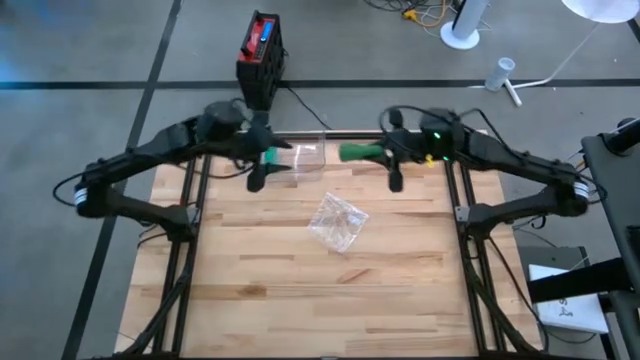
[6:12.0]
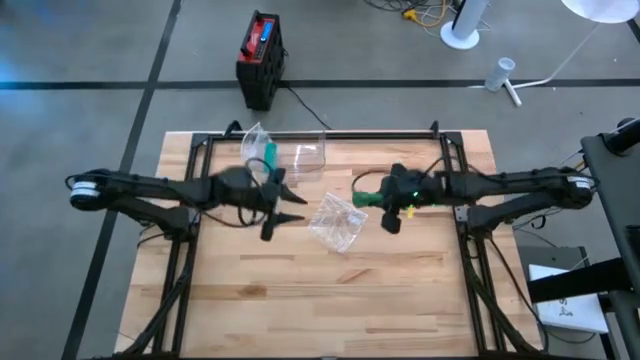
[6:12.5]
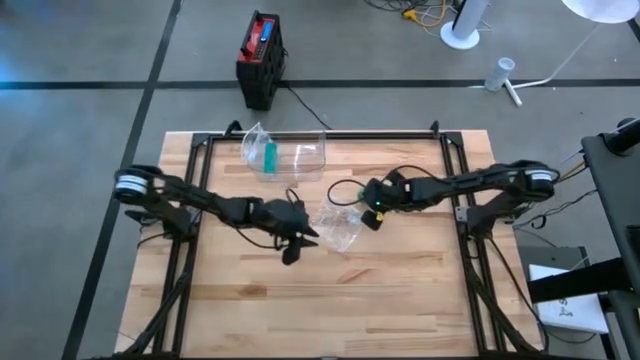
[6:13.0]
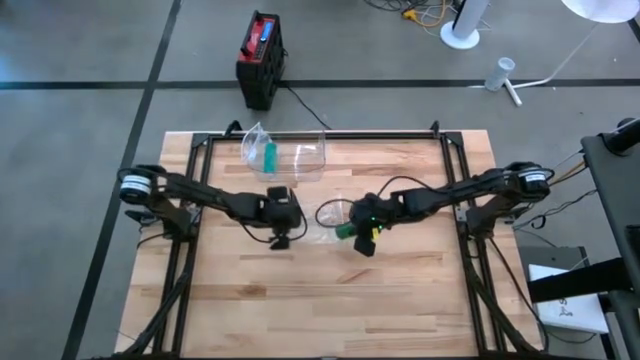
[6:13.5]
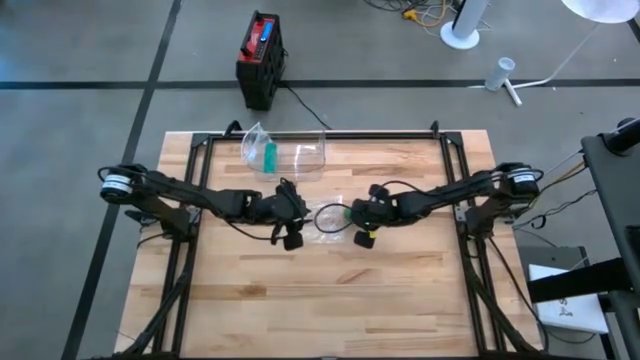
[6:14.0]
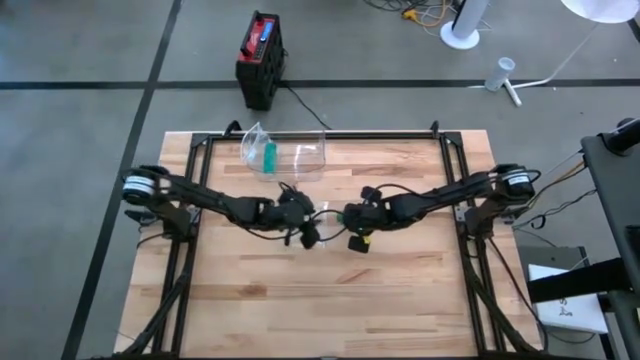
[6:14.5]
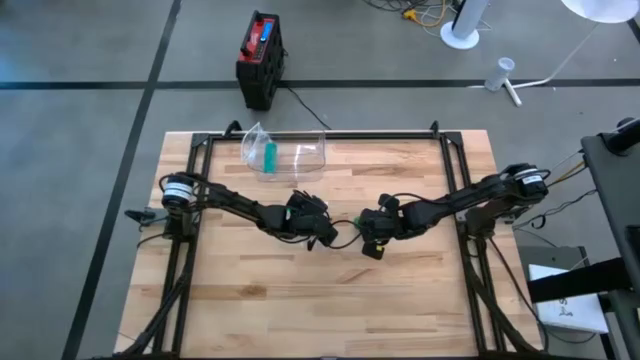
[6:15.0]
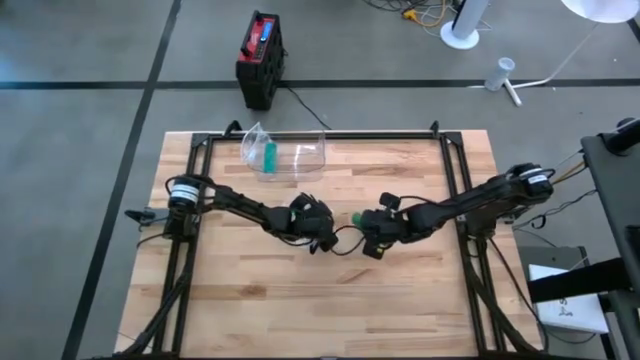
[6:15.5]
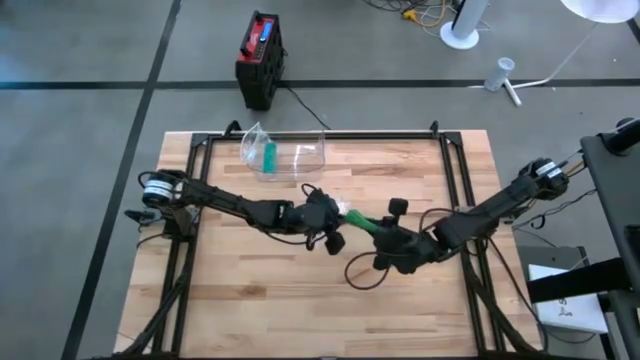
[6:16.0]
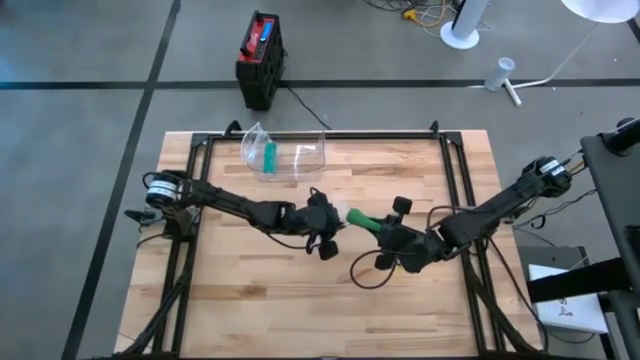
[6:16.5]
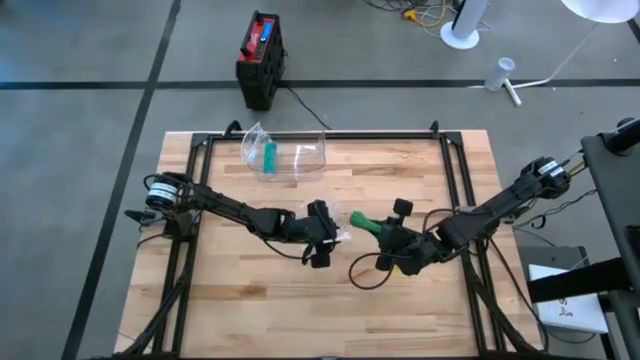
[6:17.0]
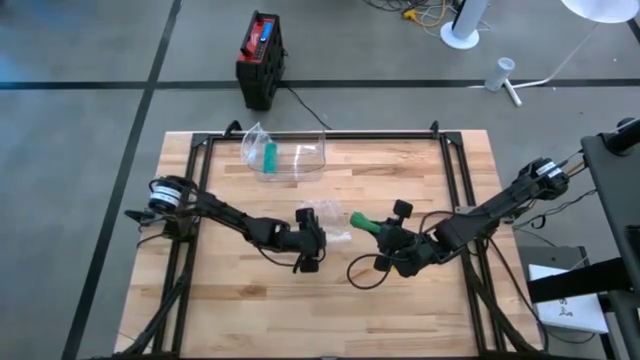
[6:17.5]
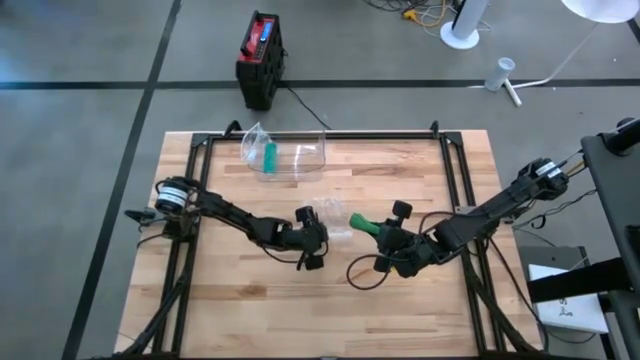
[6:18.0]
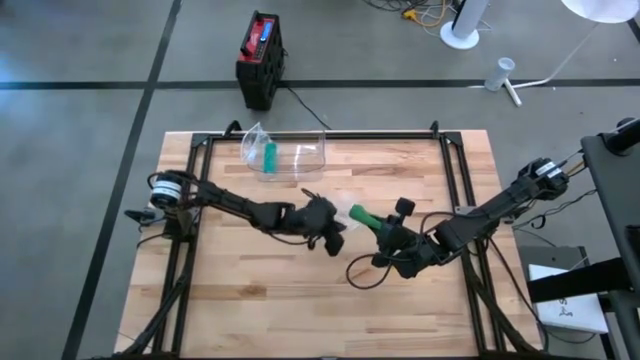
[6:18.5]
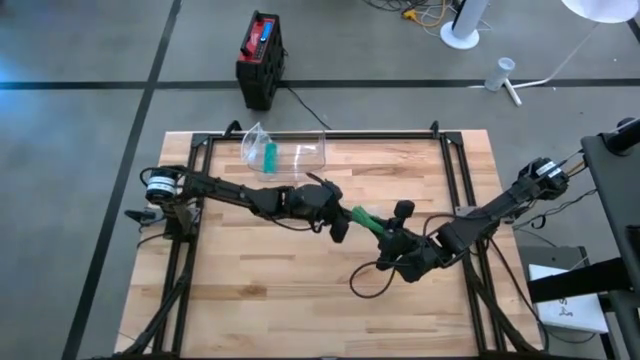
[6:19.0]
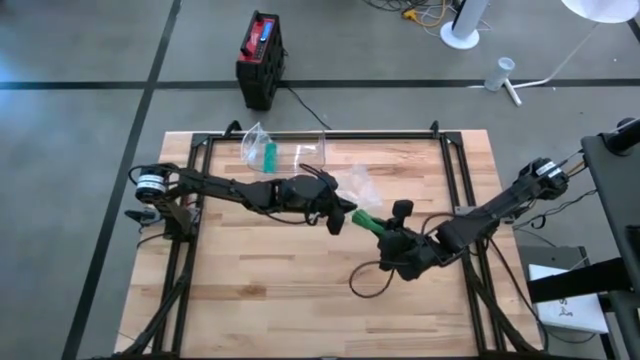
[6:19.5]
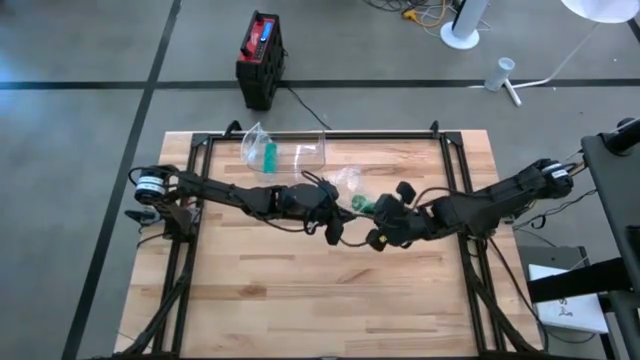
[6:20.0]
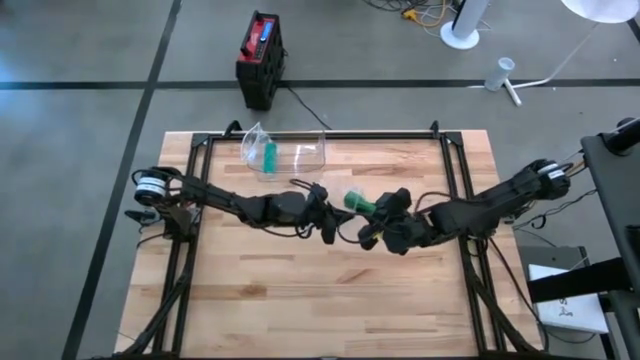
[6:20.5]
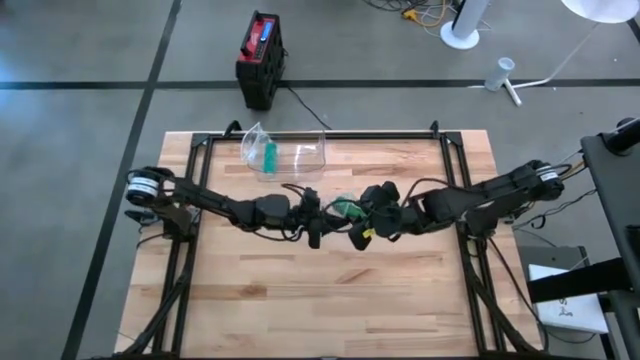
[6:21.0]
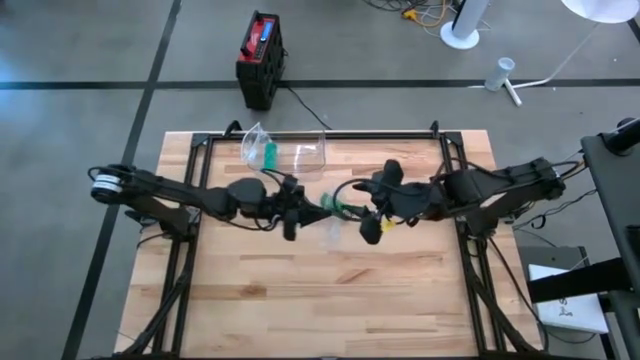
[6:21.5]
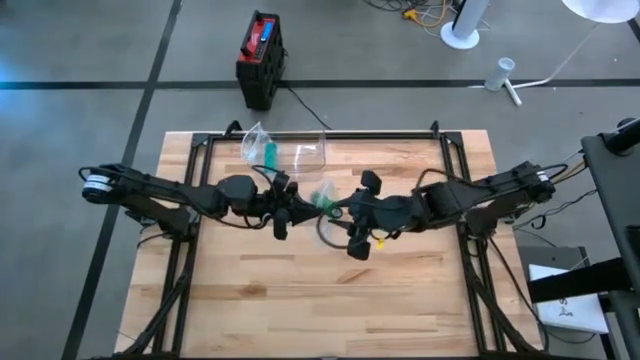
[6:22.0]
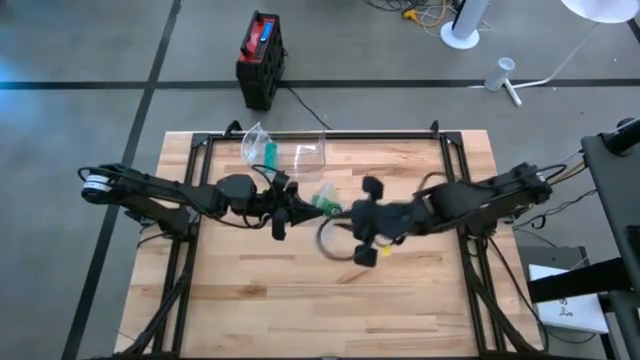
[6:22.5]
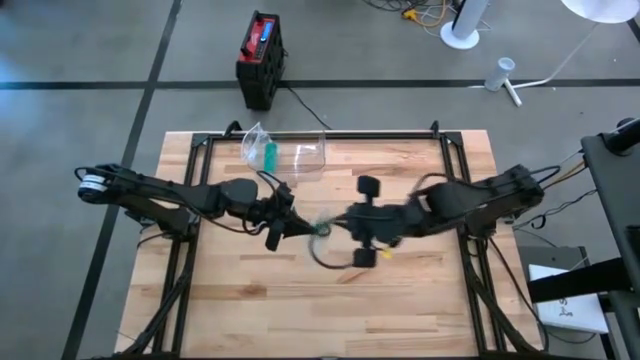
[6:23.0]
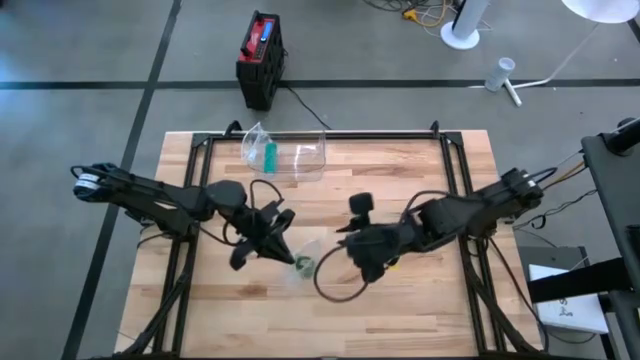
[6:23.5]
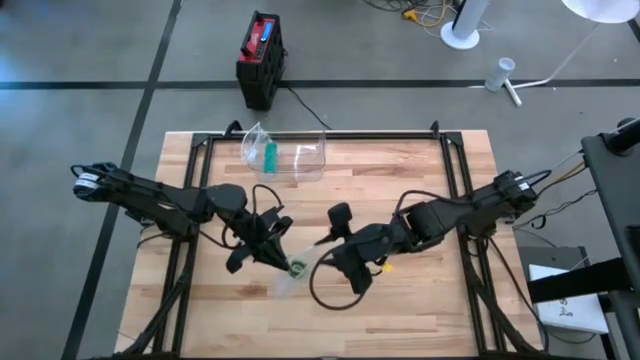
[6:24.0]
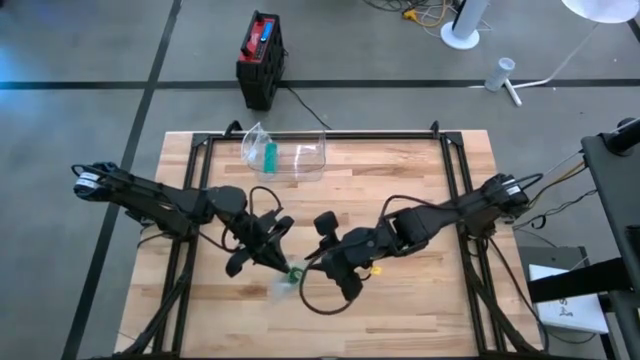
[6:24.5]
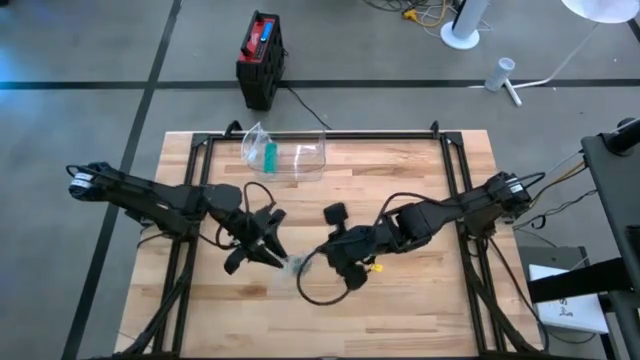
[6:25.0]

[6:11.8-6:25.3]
Task: Roll bandage
Put the green bandage into the transparent zip bag

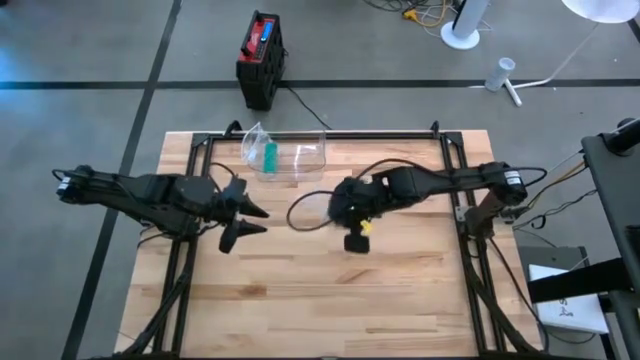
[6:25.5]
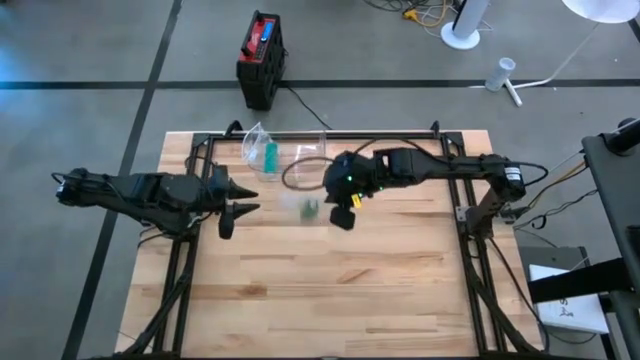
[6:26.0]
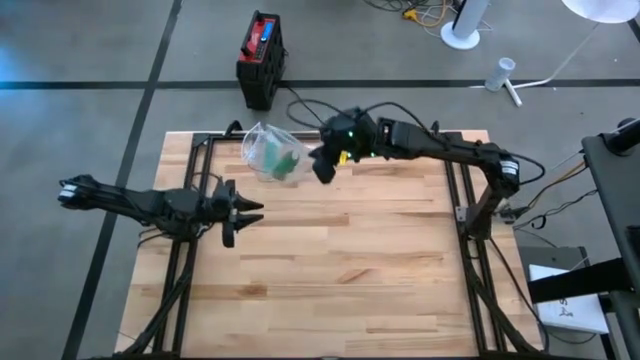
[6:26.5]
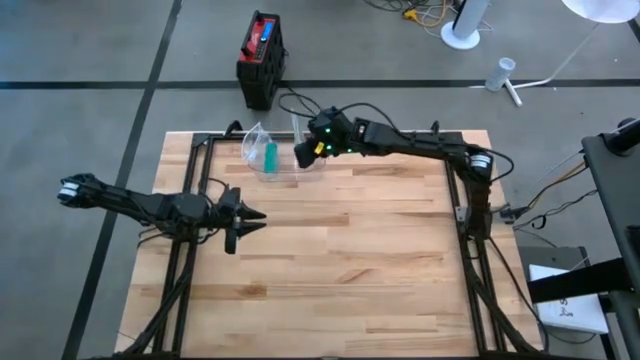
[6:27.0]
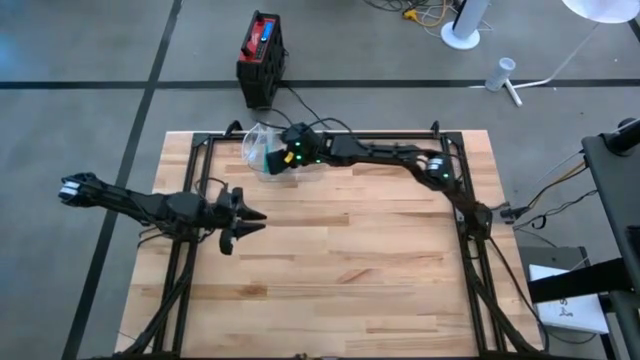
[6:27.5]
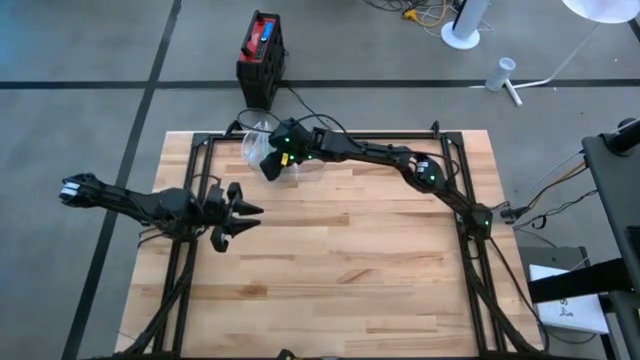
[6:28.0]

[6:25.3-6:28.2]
Put the transparent zip bag containing the green bandage into the transparent bin

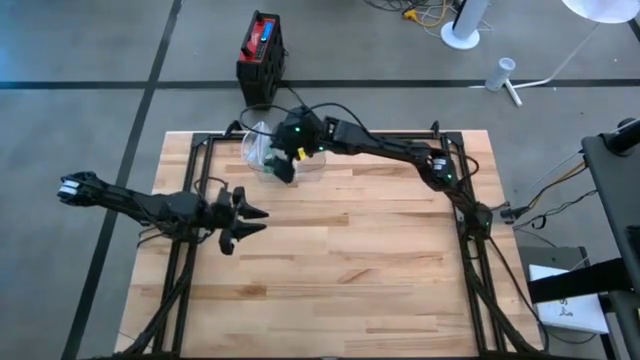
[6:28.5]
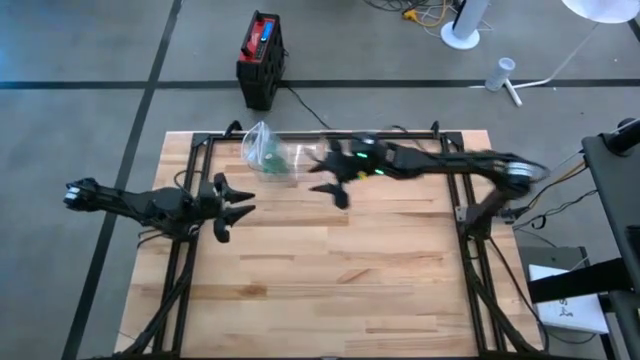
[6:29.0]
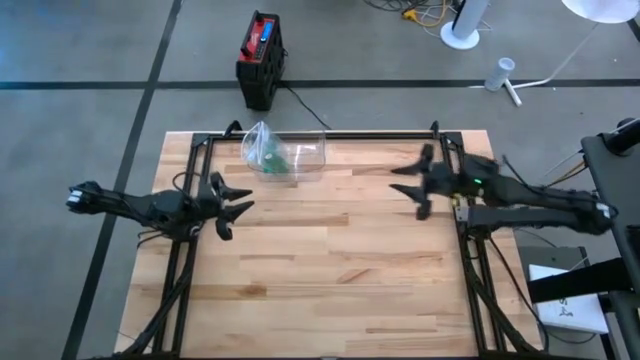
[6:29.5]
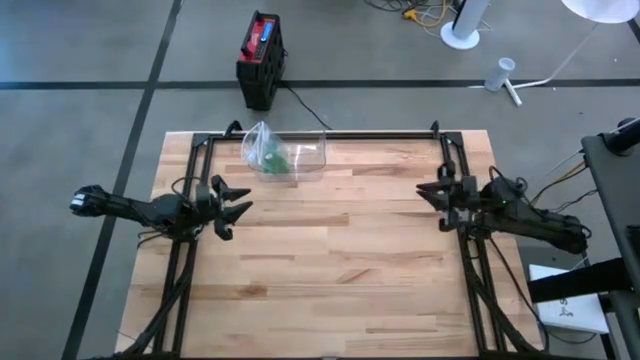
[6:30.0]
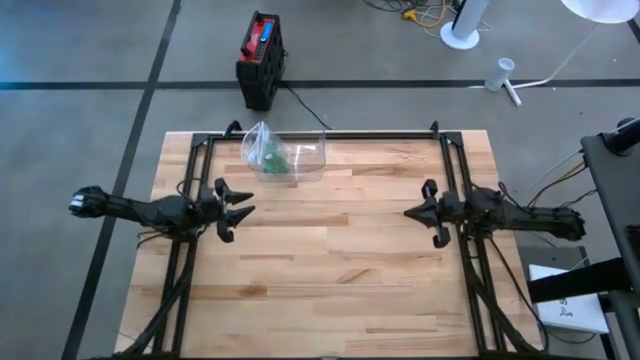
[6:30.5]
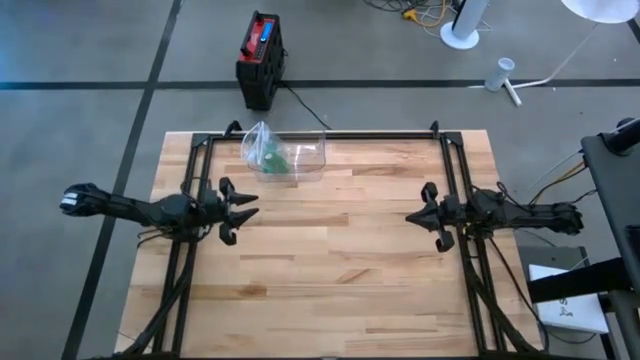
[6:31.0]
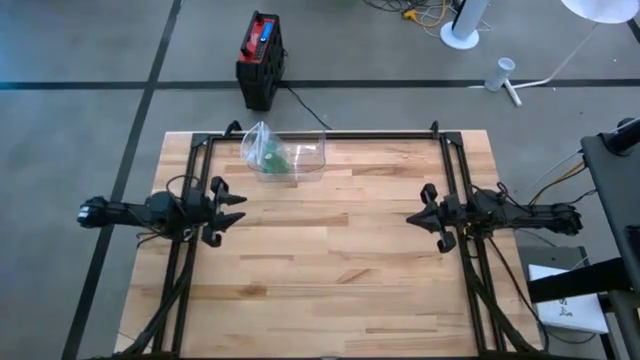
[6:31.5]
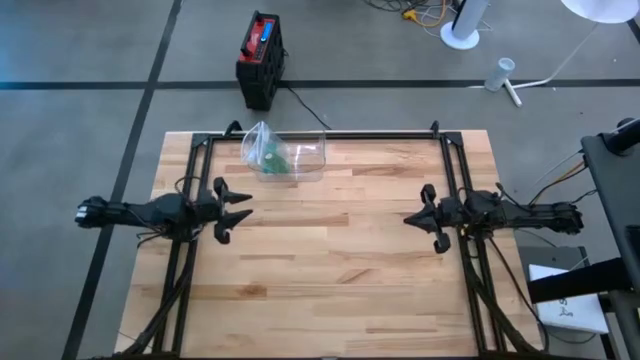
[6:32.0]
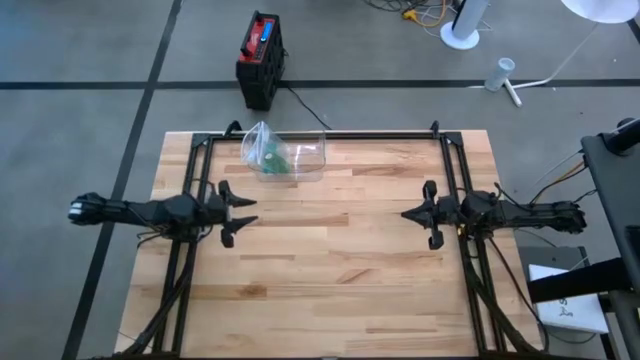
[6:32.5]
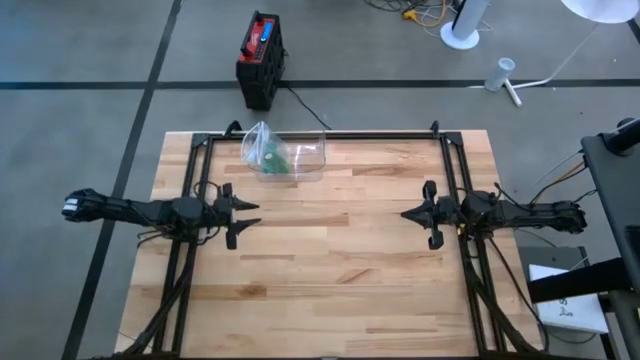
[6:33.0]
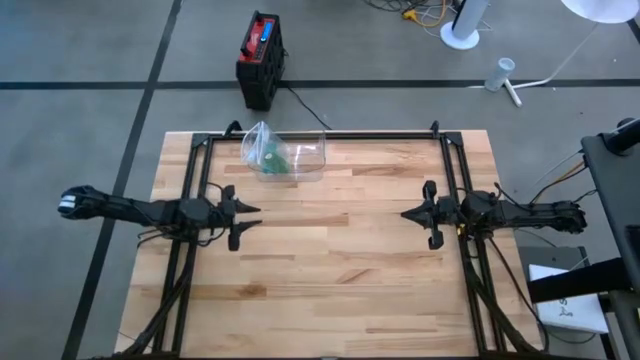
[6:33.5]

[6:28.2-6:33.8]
Return to Home Position
